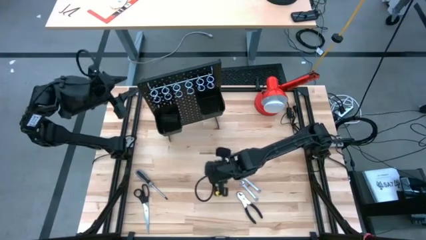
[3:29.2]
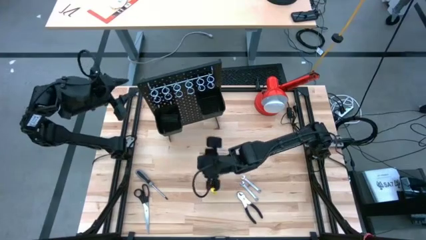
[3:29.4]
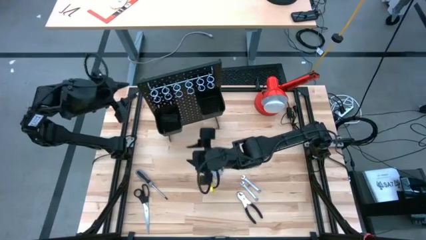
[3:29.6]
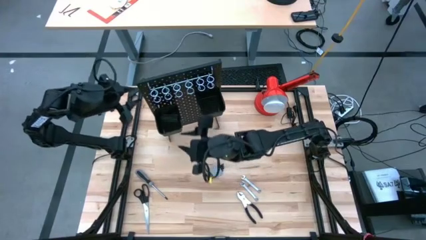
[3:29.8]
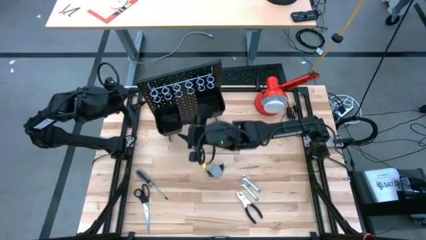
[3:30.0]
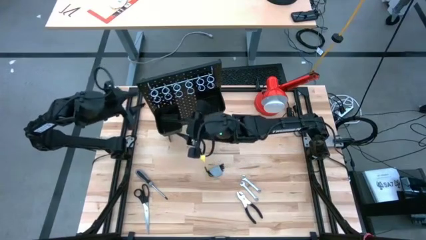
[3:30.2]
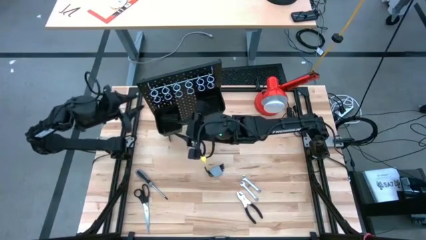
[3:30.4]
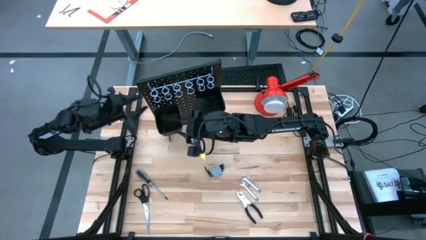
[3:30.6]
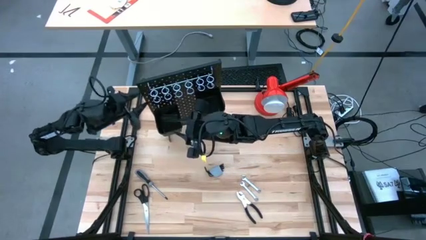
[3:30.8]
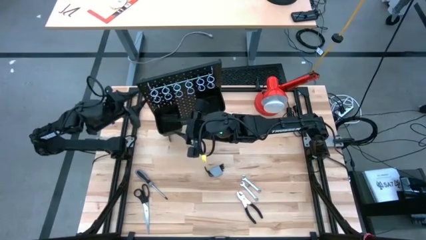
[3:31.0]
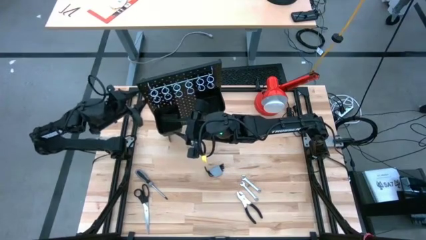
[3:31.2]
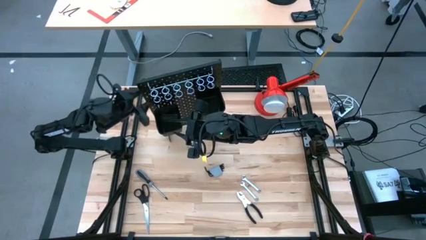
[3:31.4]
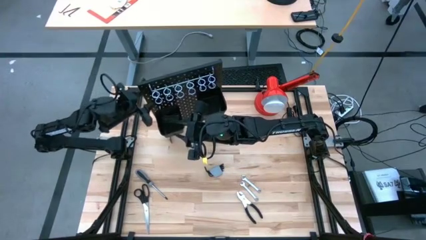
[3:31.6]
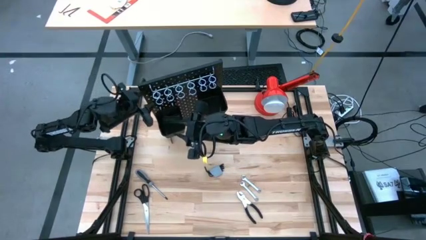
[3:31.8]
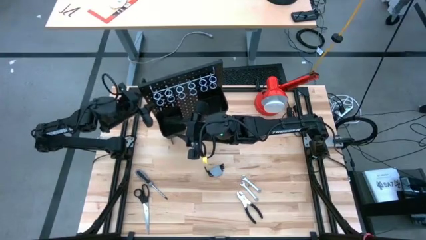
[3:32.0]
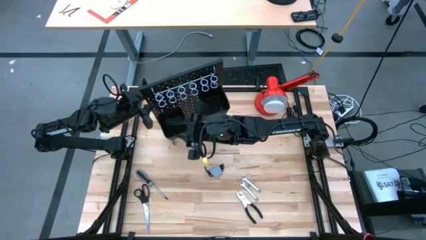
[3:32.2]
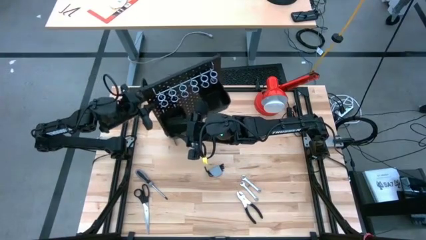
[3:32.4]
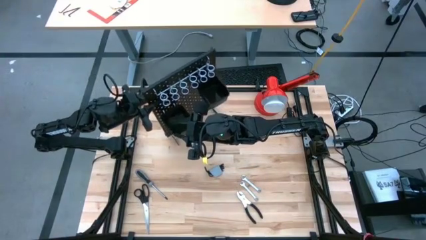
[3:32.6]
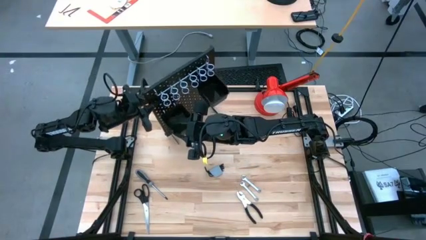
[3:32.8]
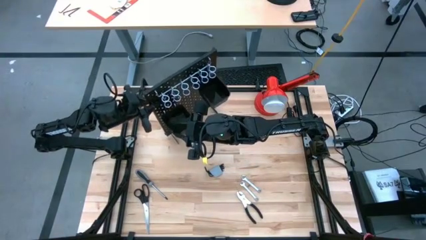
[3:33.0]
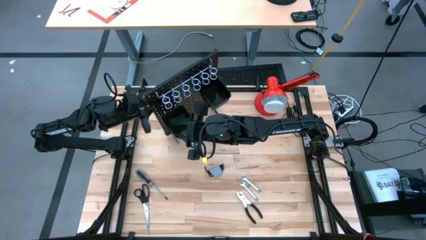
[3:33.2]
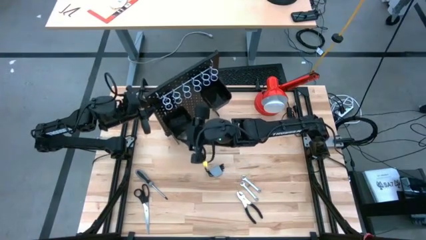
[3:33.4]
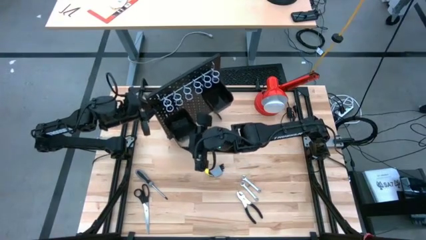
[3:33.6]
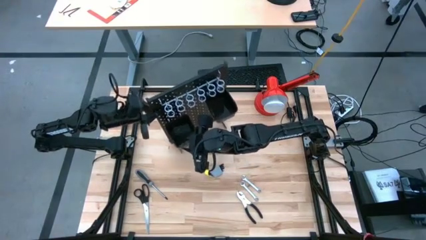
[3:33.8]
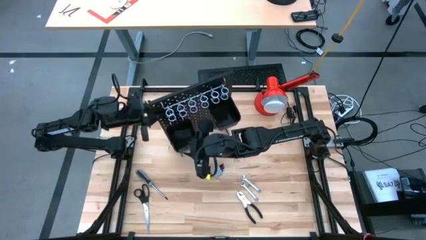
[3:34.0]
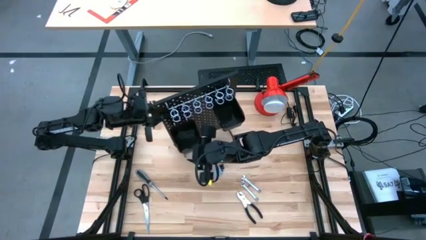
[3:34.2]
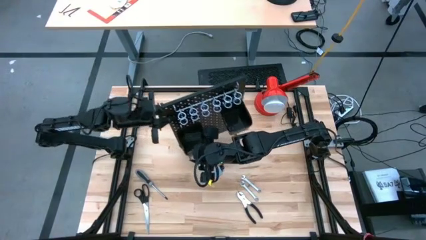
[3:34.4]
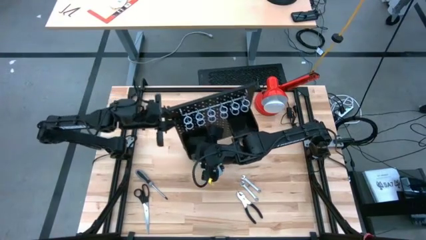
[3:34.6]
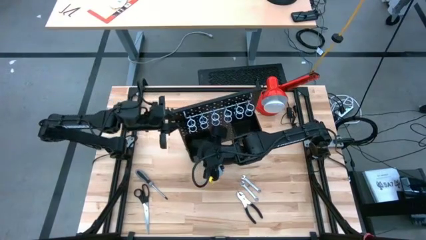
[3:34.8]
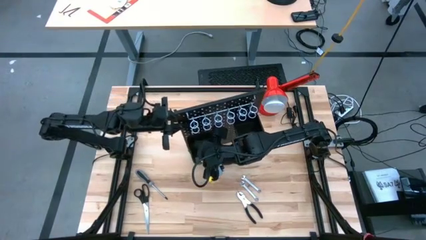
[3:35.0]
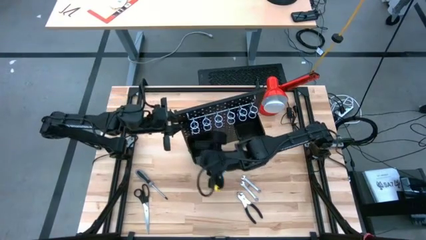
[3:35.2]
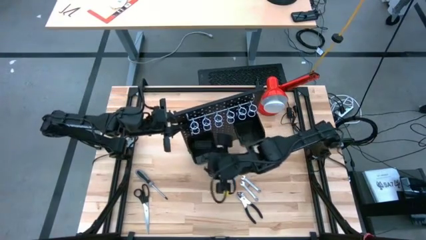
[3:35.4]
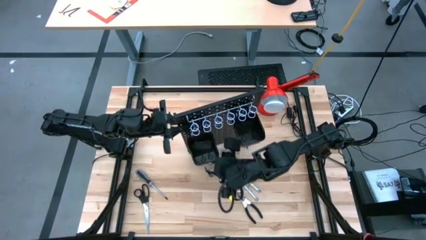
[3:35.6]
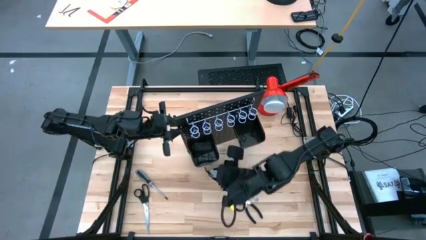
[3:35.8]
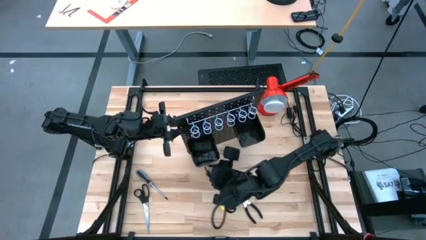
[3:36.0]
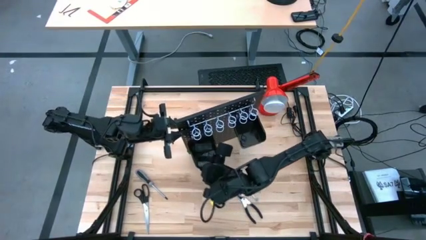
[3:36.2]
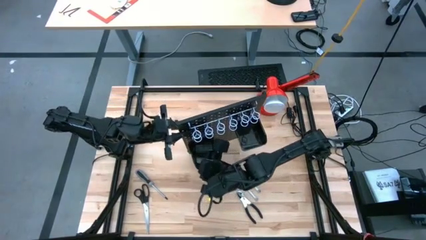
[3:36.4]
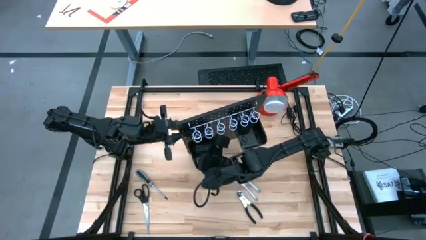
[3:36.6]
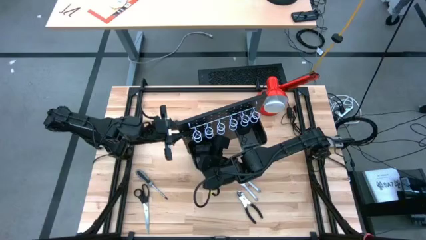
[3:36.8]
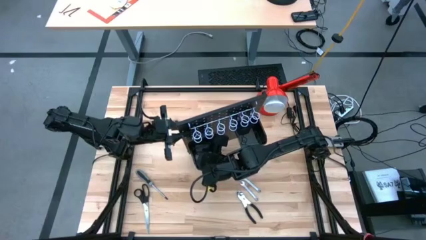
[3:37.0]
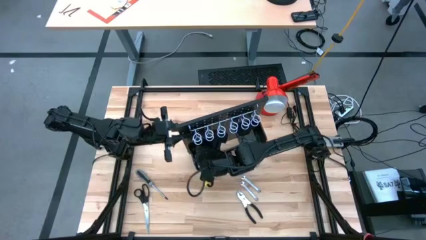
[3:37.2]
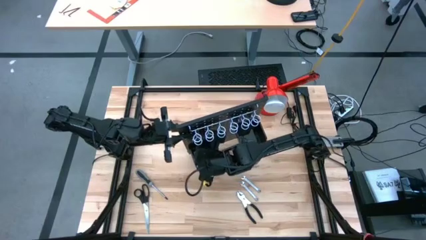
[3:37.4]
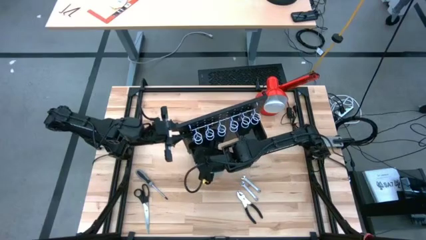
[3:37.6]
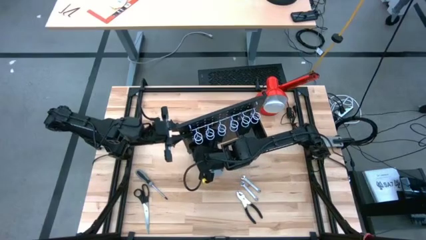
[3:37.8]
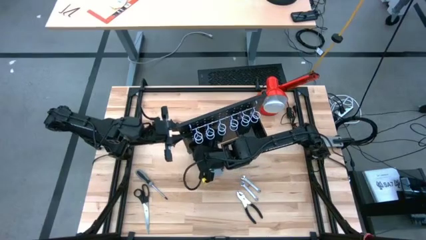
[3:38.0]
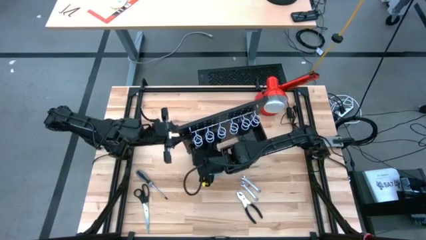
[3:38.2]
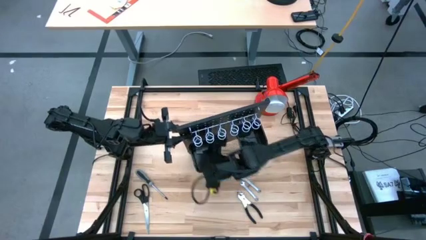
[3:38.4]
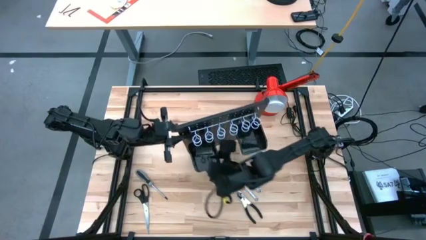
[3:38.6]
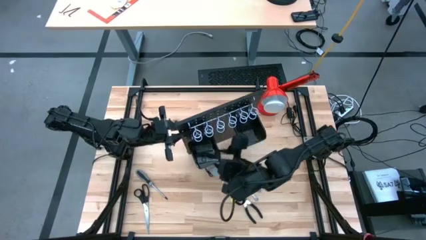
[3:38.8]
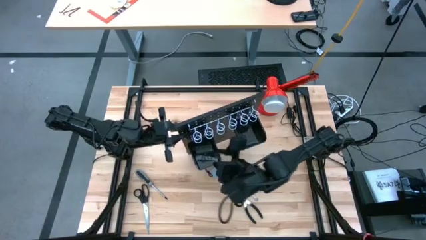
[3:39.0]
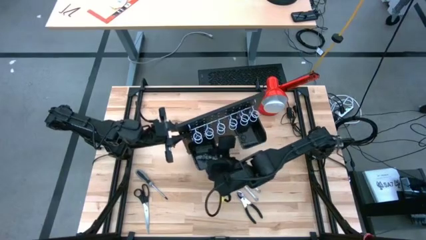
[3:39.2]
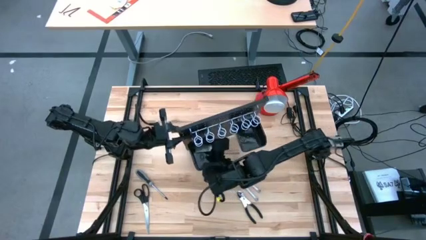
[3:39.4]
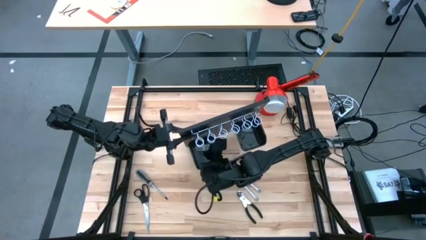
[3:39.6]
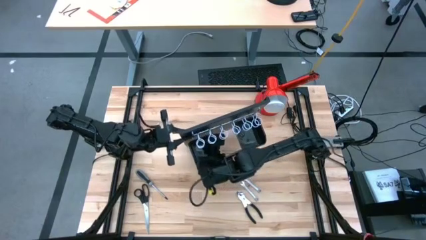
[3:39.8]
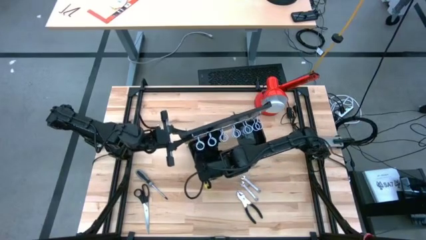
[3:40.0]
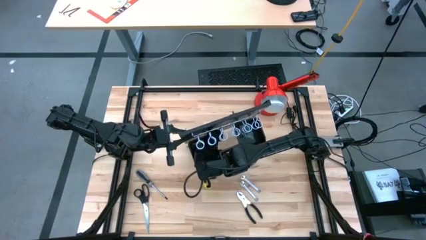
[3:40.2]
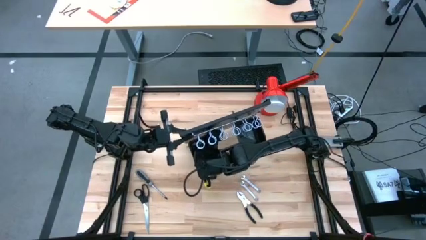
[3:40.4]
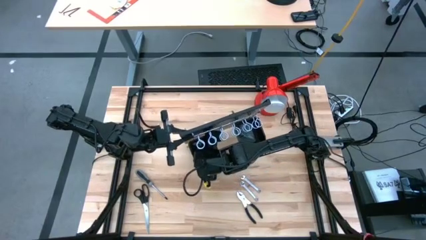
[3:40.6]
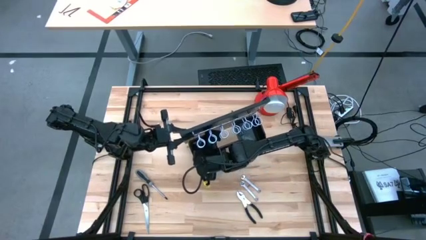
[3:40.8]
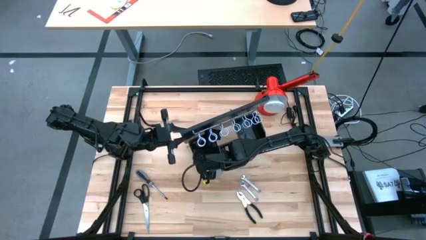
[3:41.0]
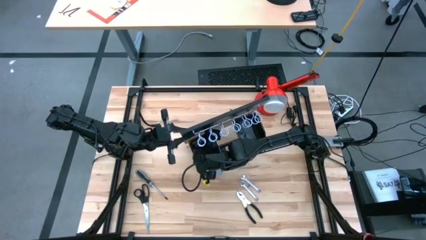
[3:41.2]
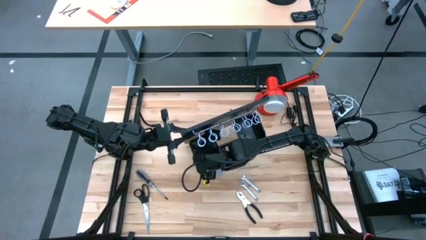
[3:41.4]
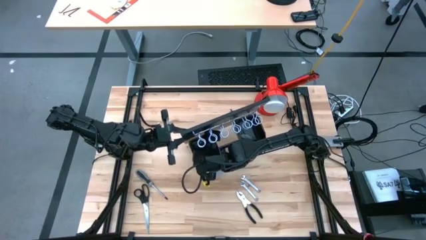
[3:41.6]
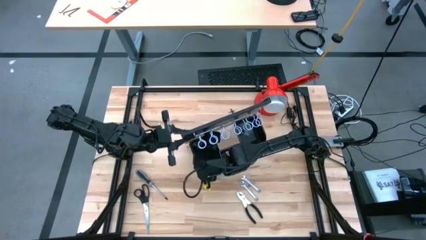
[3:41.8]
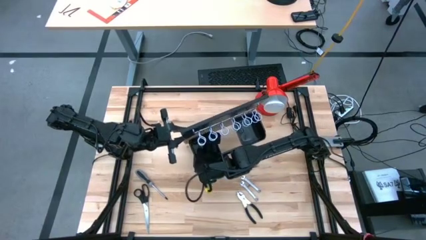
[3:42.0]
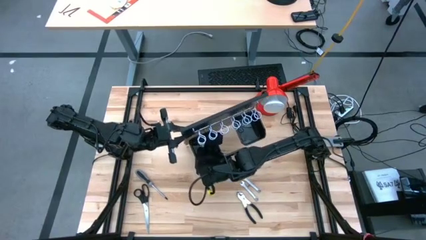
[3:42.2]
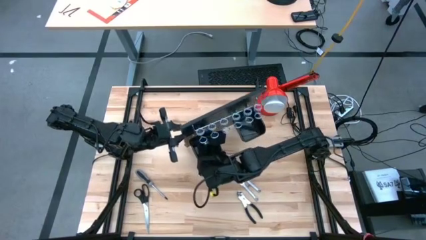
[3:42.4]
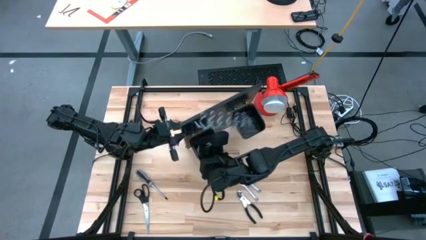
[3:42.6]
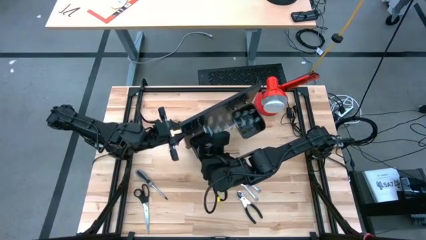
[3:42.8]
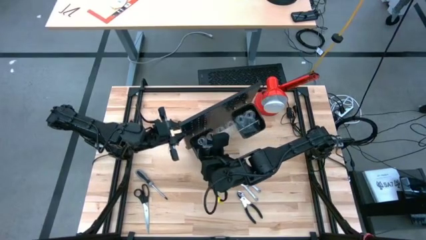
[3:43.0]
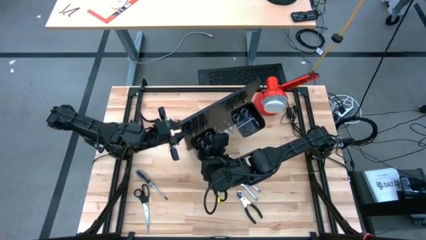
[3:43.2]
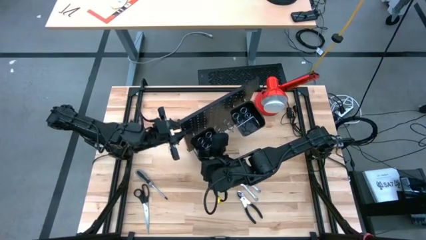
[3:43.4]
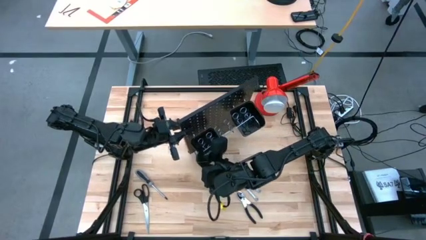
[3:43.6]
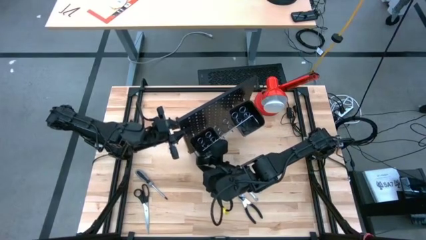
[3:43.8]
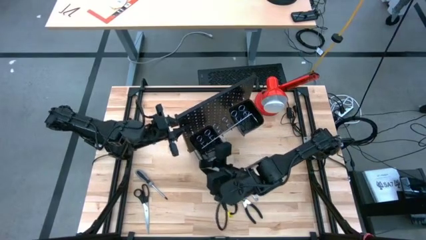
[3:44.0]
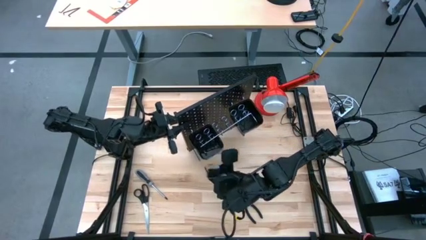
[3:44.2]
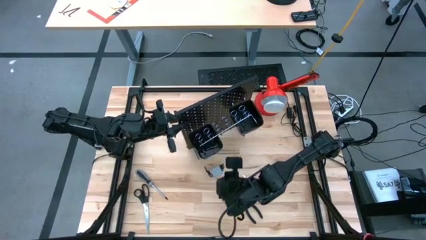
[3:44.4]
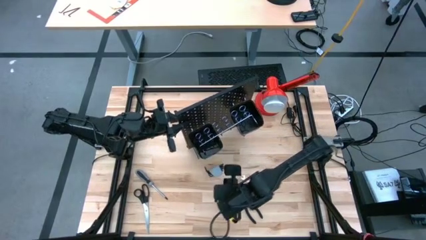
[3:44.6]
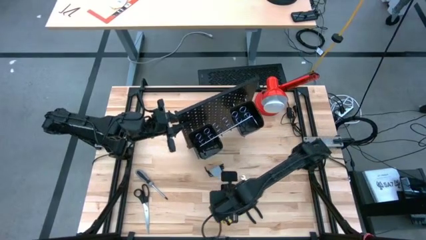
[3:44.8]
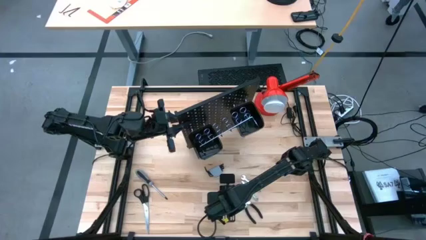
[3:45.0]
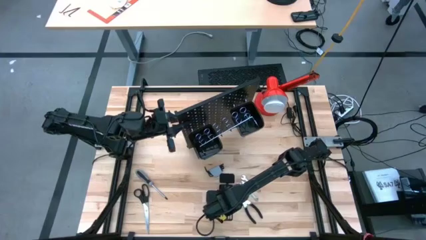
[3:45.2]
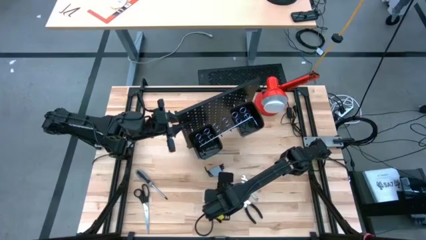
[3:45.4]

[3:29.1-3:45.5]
Task: Hang tools onto peg board
Remove the blade dispenser from the bottom black basket on the pegboard to the table
